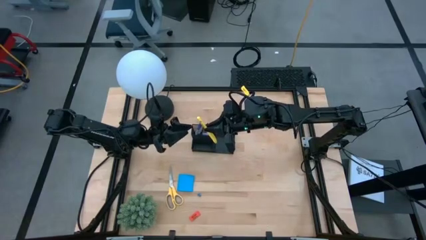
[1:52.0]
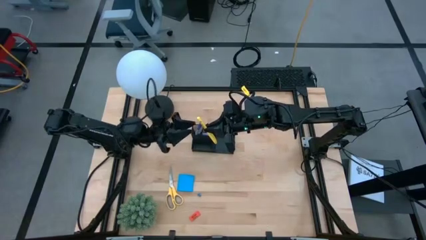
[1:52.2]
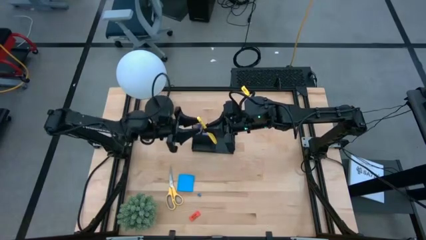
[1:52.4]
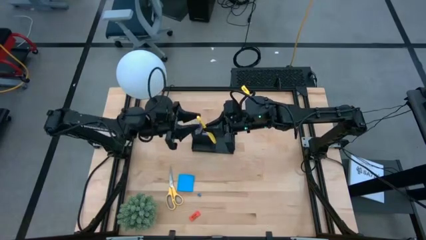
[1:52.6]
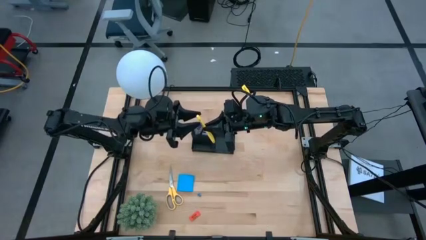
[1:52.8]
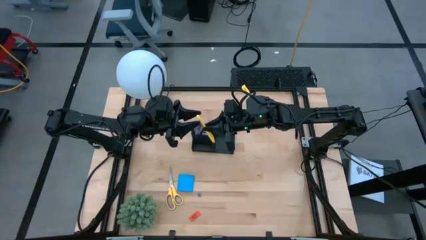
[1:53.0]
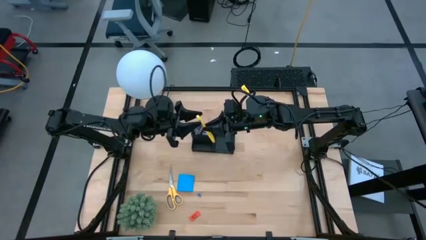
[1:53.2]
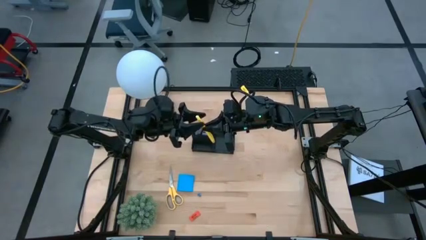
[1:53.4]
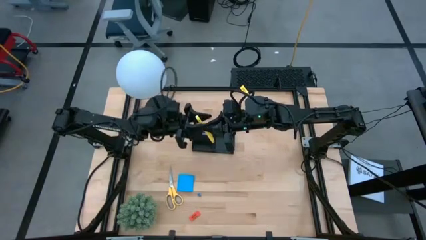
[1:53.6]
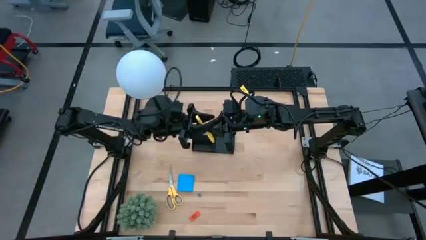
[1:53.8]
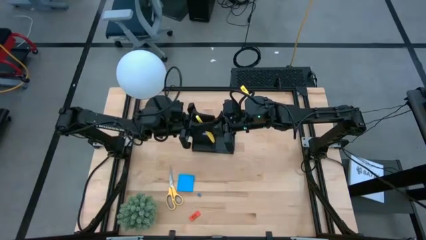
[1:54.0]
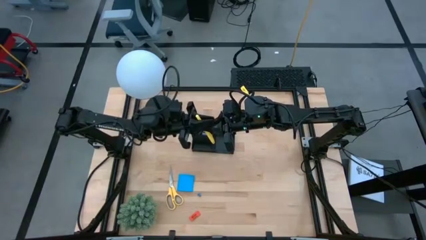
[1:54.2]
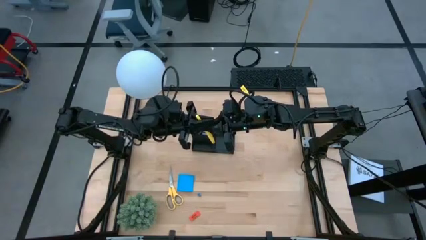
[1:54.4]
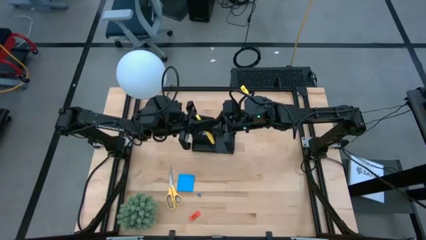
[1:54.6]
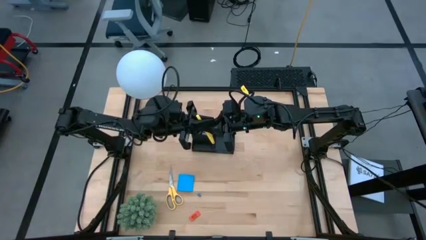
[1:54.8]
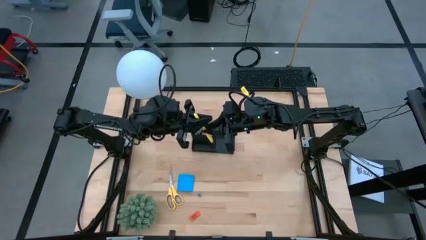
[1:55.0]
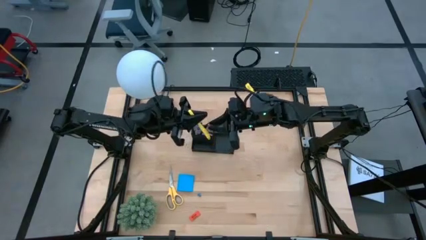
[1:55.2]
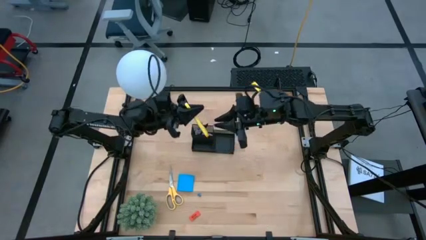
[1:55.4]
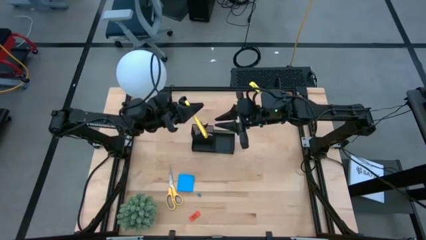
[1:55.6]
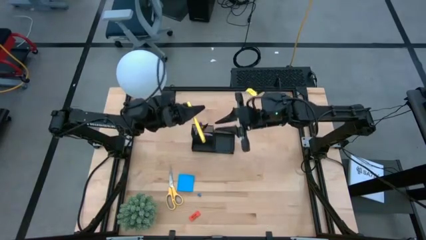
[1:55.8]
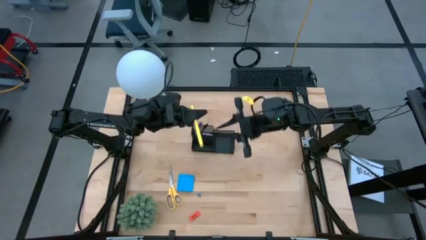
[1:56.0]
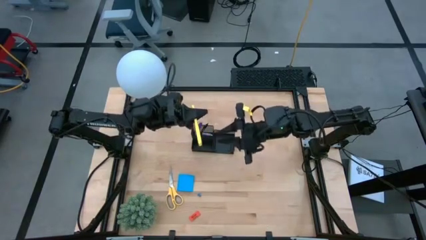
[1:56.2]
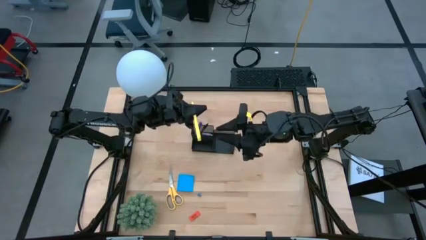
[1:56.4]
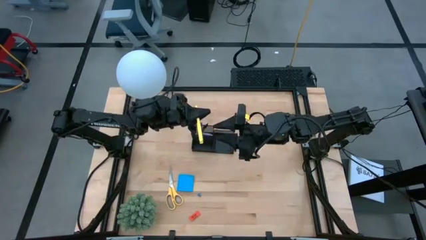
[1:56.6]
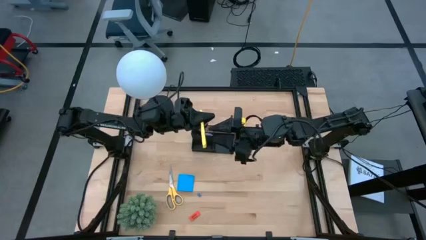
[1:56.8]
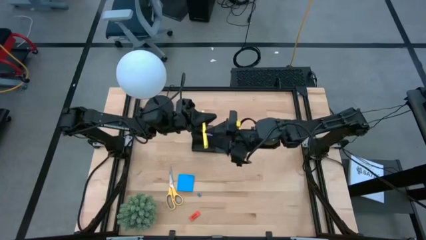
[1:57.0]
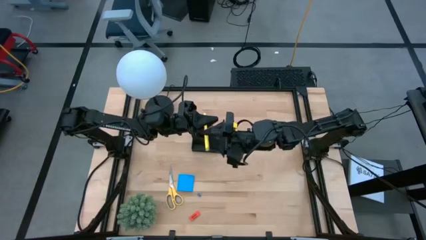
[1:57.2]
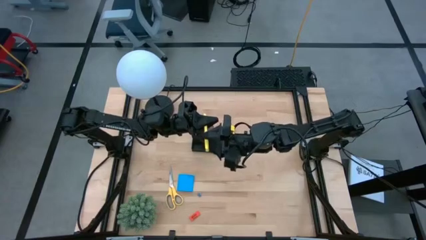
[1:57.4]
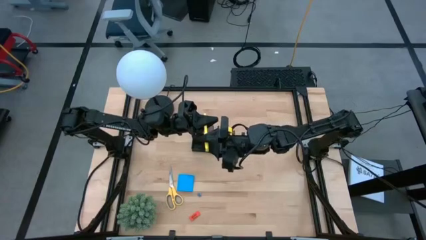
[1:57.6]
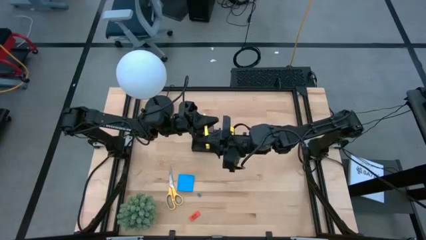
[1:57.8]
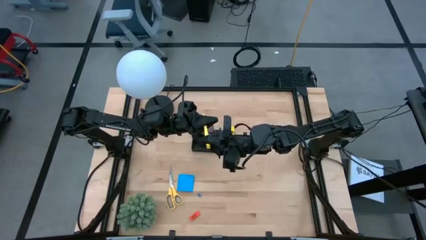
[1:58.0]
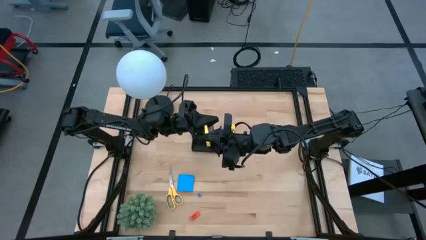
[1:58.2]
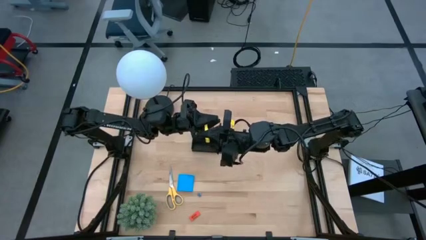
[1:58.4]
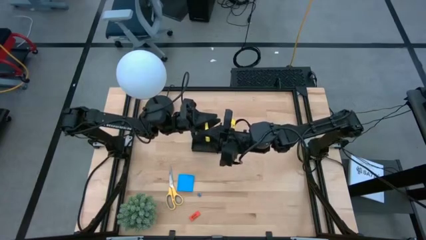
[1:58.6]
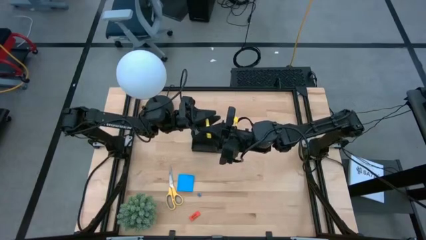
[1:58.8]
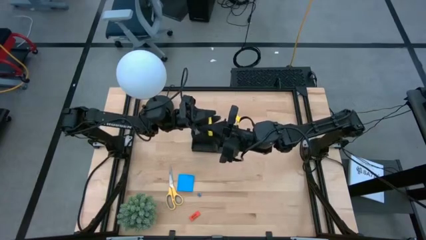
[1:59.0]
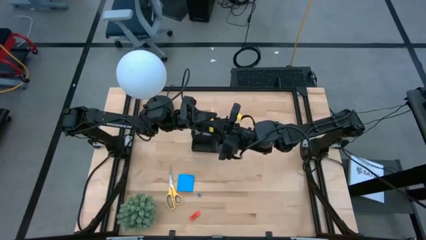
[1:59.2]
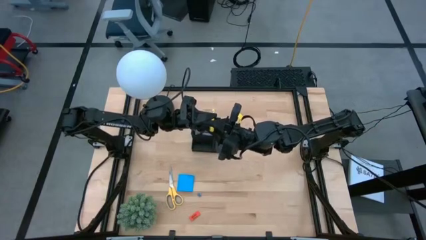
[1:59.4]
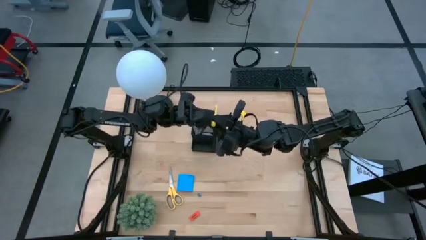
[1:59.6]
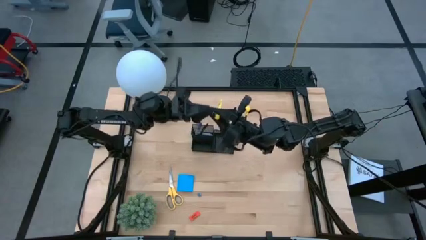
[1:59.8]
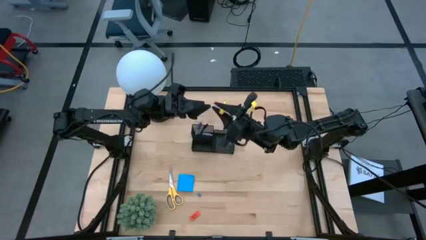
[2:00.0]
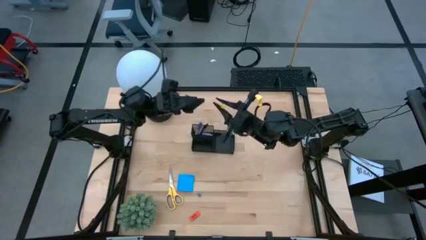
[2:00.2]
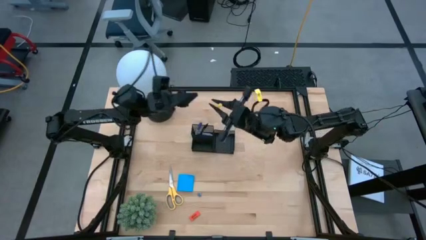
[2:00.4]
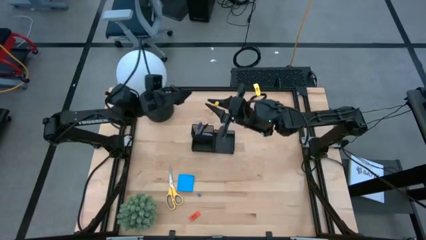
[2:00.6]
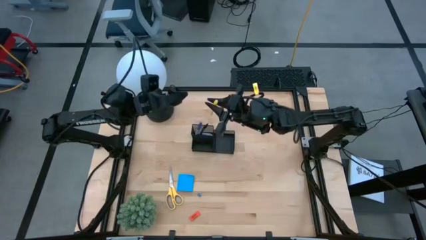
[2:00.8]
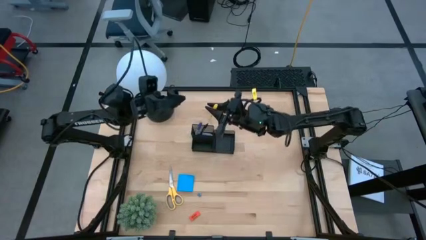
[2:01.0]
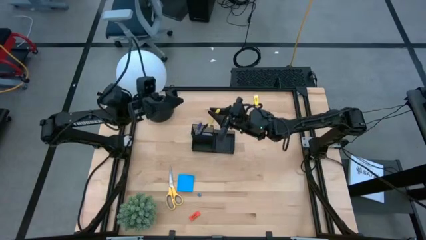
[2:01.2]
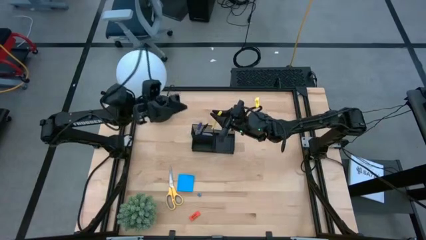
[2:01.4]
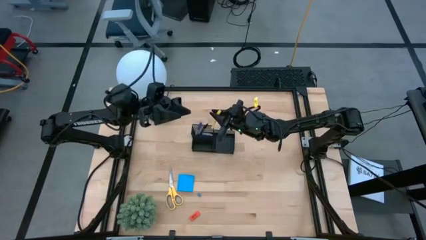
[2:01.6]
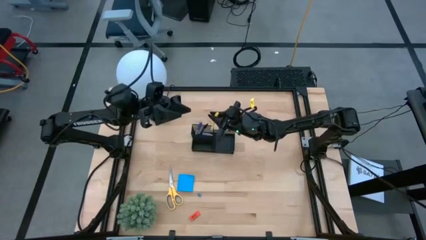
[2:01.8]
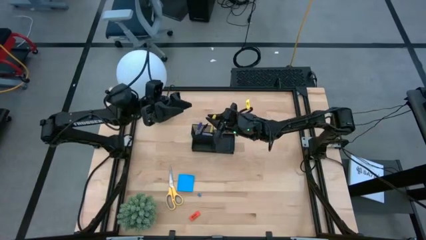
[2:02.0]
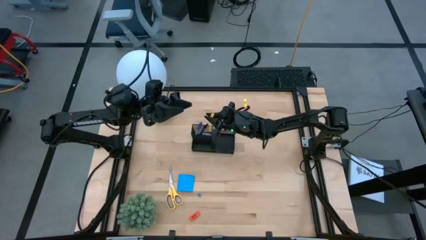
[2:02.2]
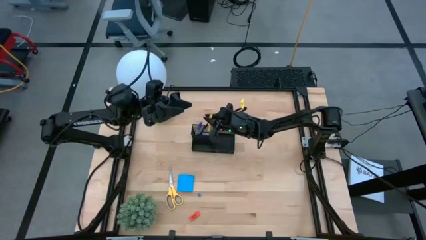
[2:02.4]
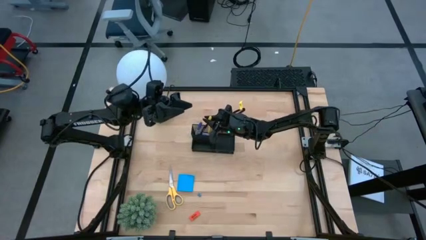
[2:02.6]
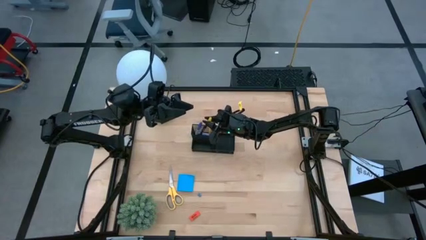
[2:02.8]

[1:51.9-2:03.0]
Task: Pick and place office supplies into organizer
Put the yellow pen into the black desk organizer

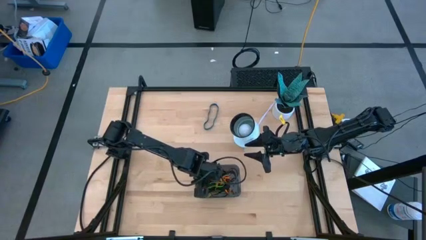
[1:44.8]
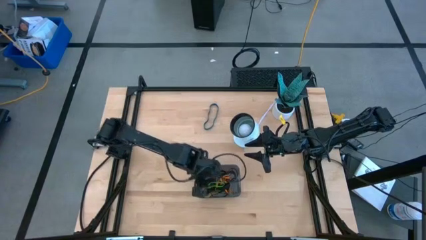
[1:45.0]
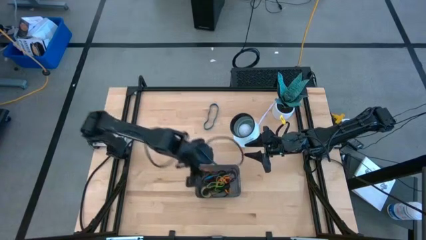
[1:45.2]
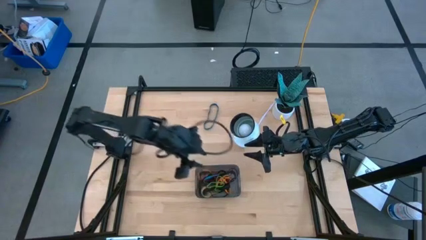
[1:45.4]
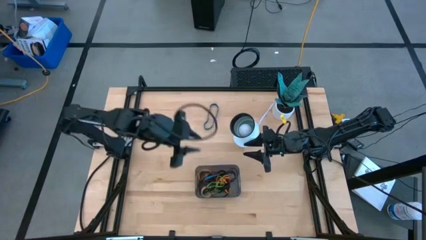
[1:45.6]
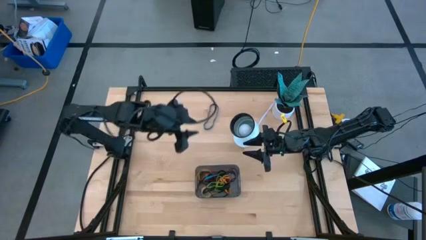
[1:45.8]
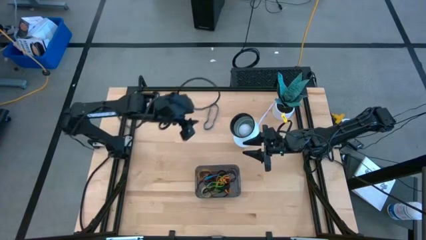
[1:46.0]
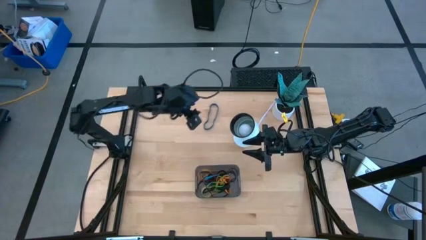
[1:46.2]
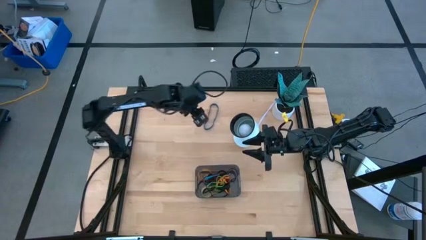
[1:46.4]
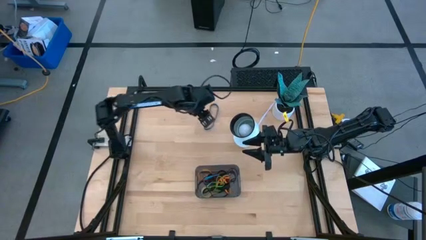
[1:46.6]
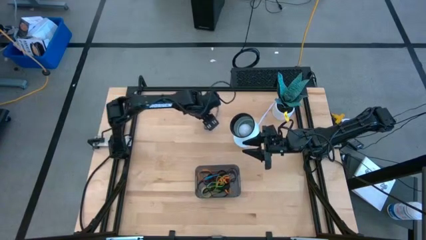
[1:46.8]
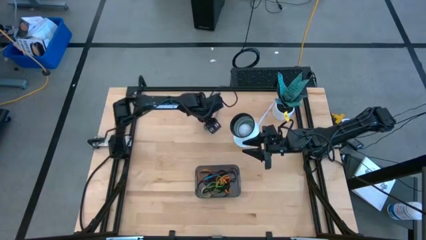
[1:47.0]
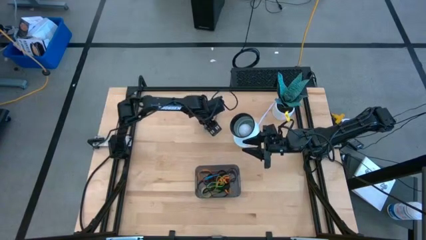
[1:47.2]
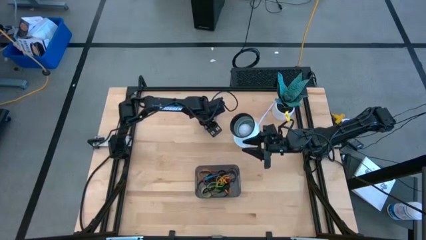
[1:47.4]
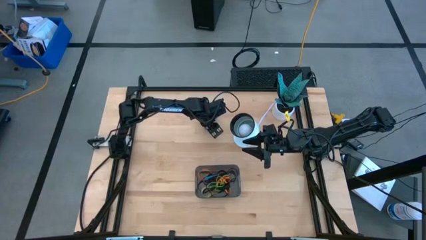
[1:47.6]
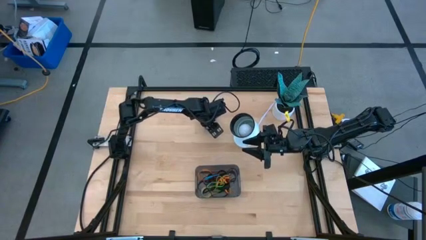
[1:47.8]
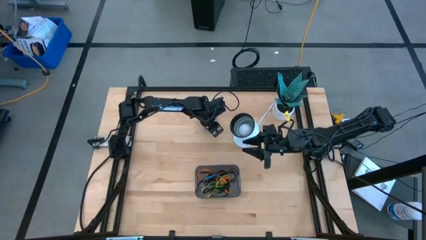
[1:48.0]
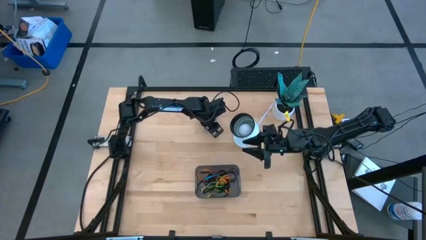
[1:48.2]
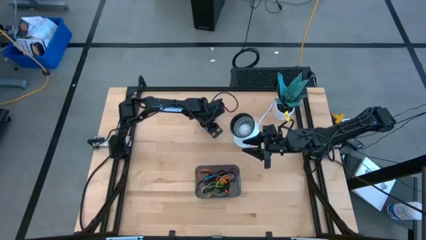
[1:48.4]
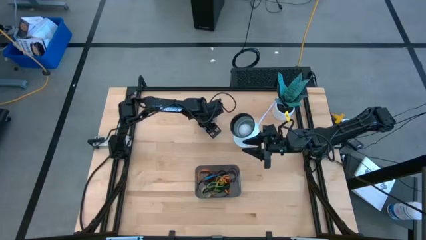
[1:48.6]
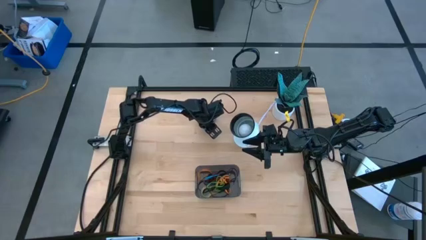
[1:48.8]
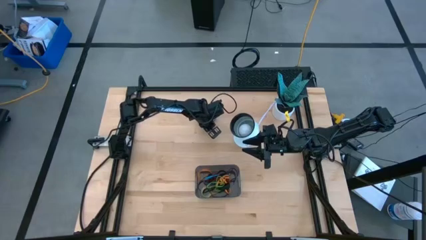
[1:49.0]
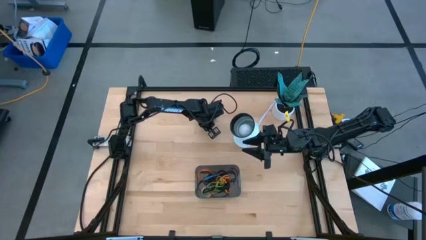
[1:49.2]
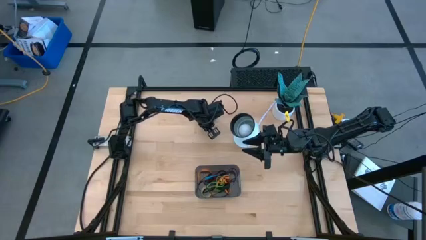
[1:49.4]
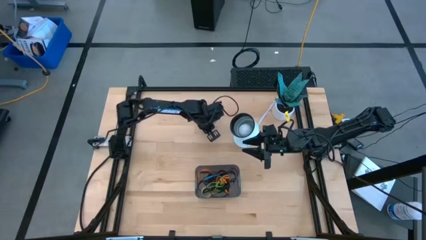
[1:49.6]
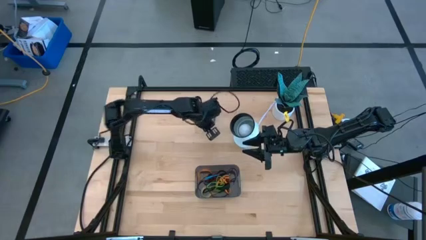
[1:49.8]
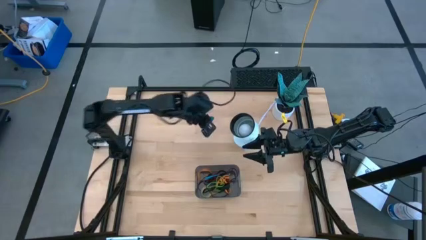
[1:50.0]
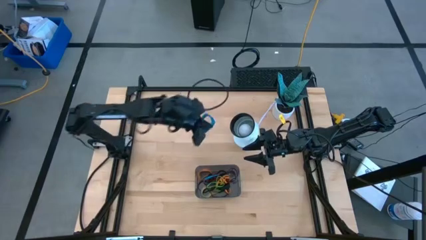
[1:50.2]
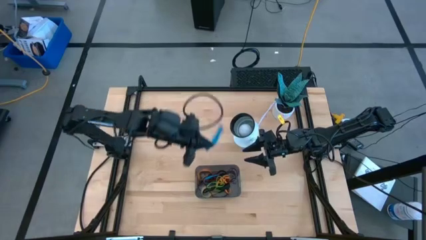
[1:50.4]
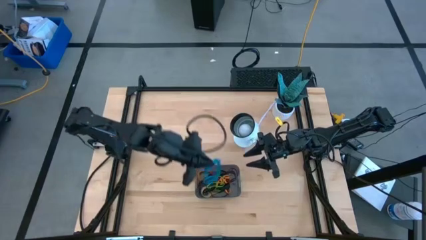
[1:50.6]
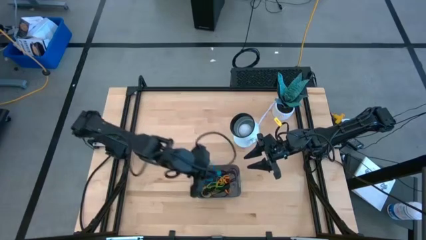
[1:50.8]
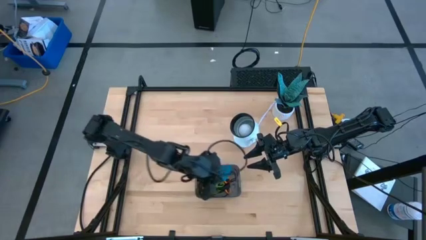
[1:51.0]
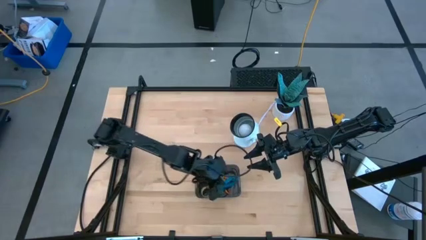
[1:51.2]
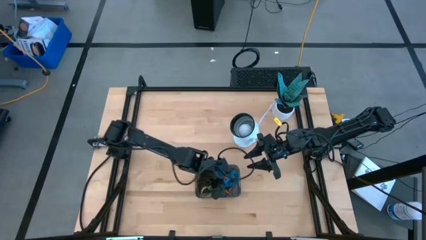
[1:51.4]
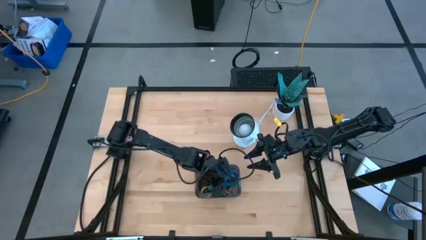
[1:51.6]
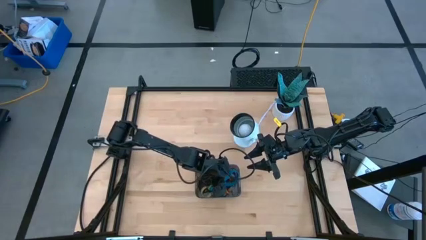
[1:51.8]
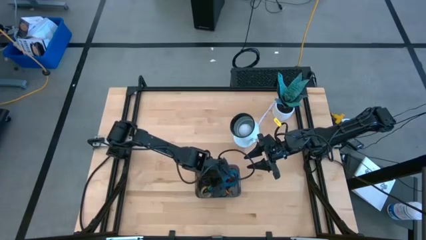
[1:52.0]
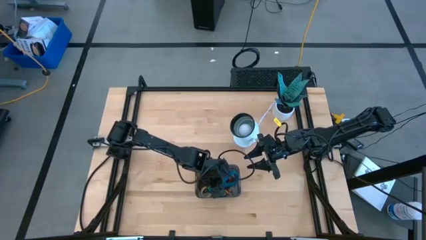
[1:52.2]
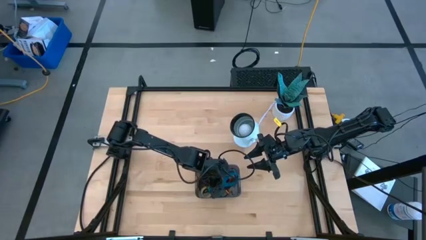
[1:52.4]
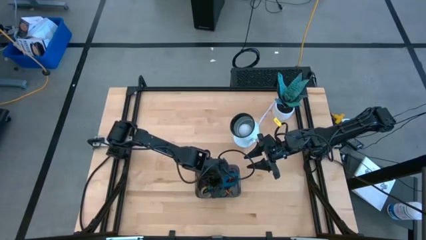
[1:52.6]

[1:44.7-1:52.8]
Task: Pick and place rubber bands into bin
Put the large blue rubber band into the black bin
